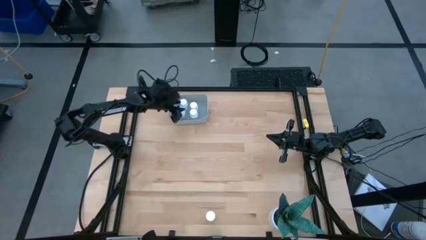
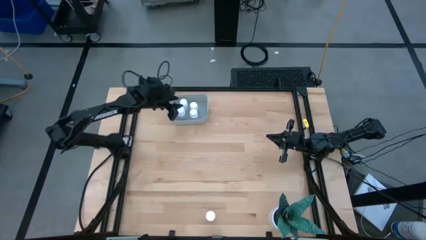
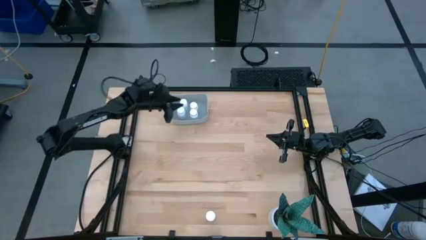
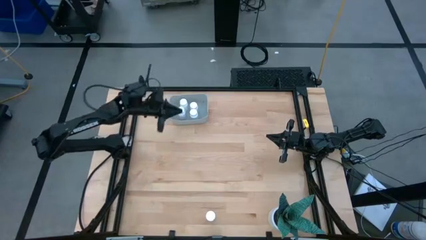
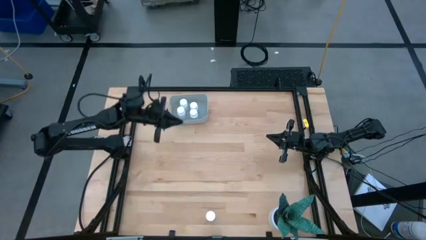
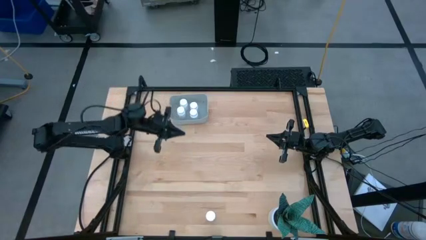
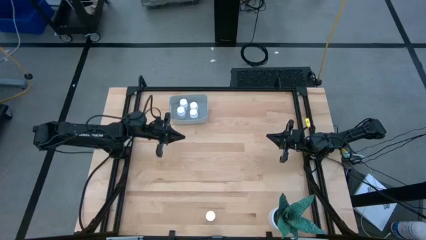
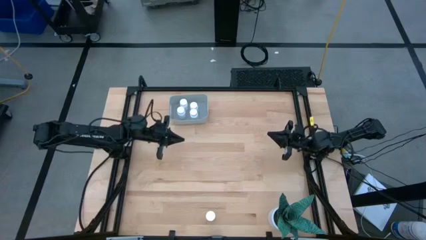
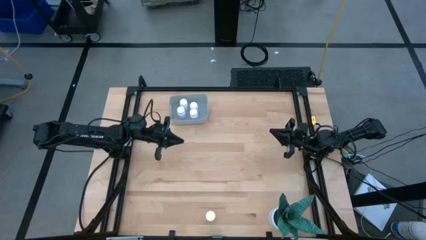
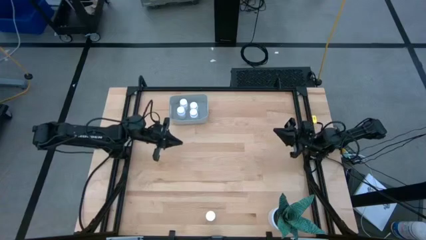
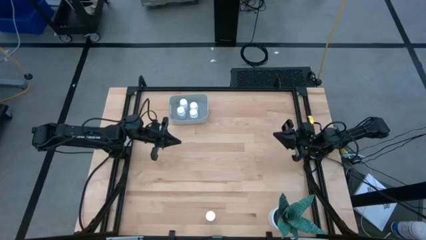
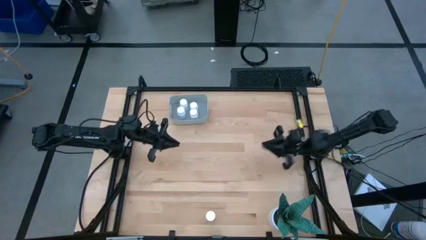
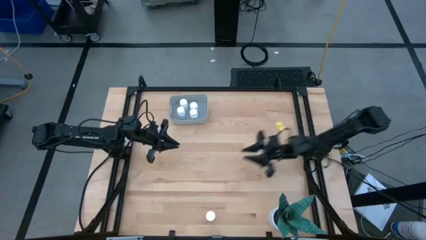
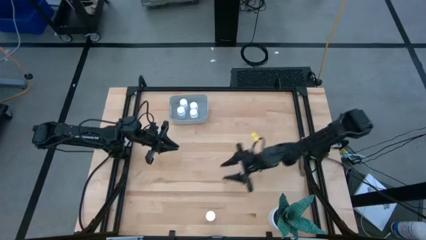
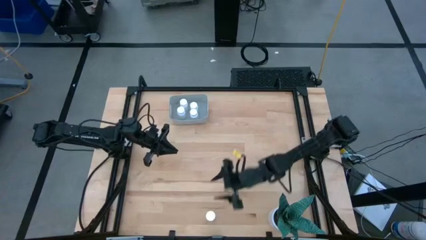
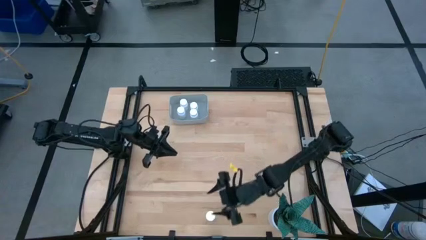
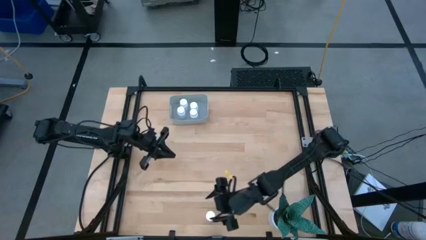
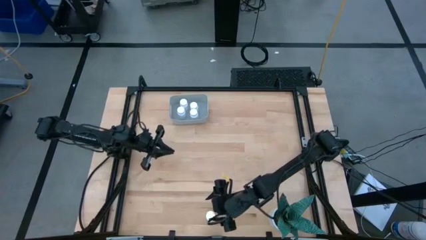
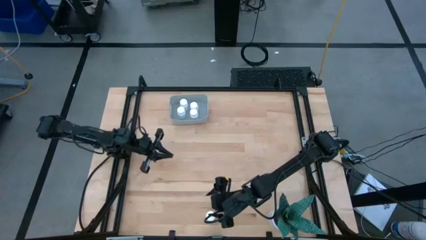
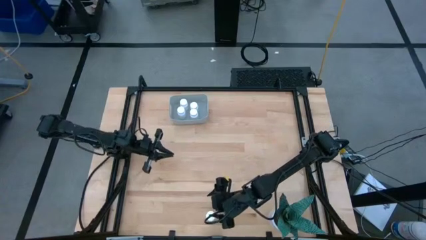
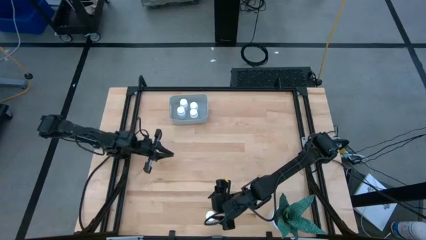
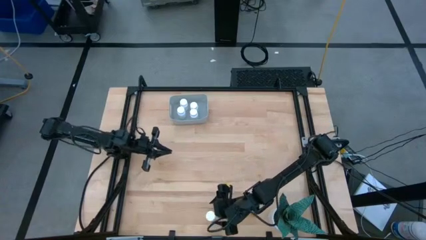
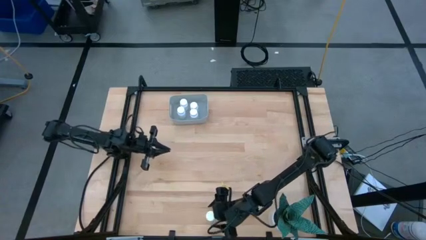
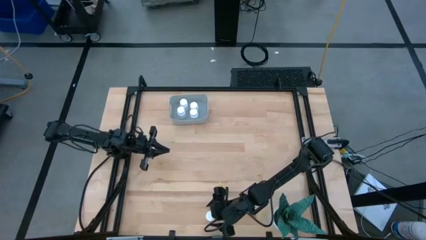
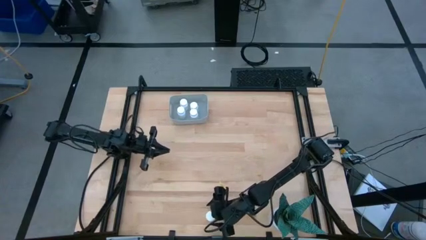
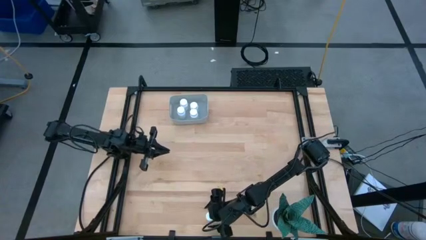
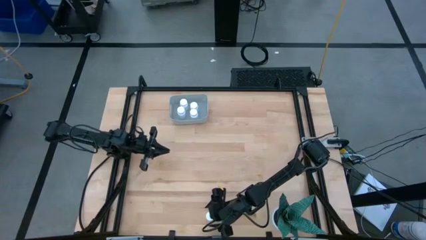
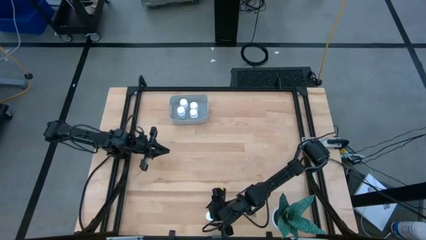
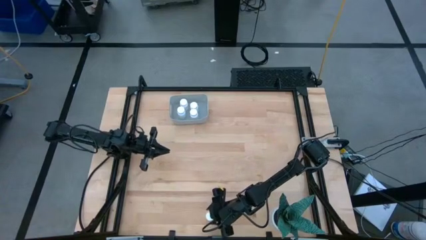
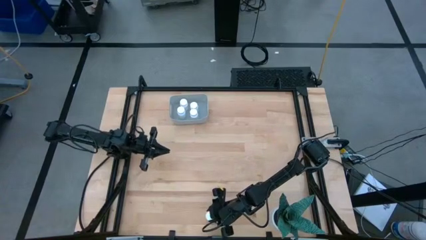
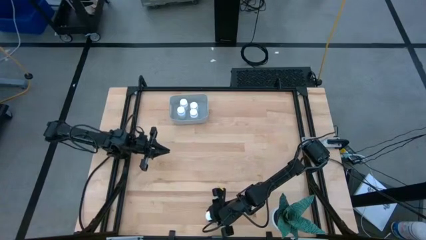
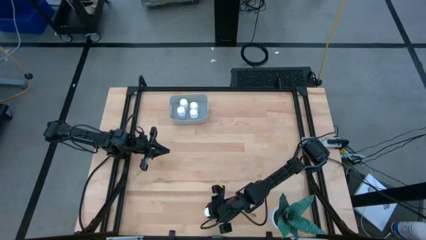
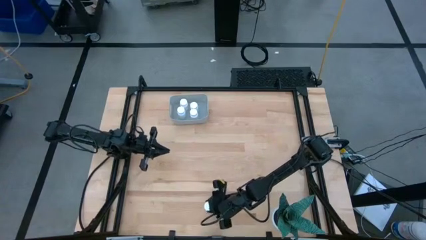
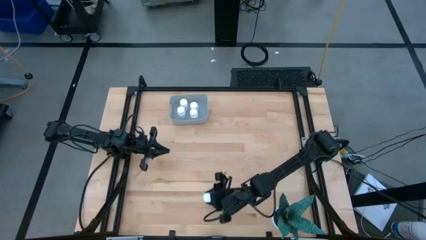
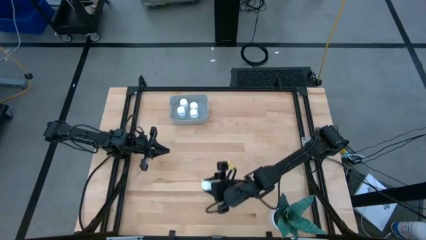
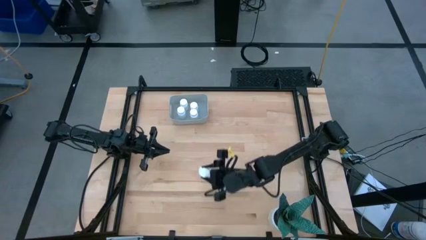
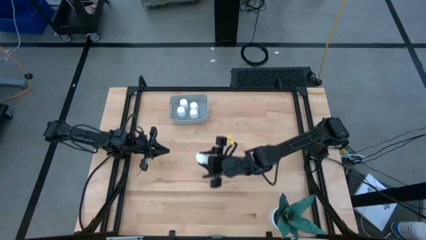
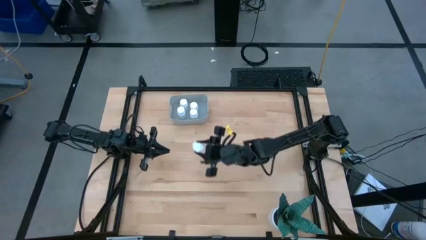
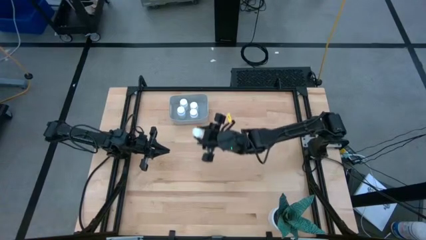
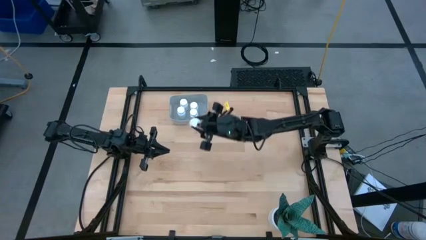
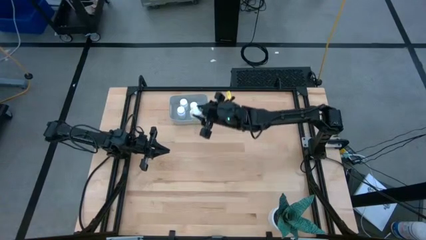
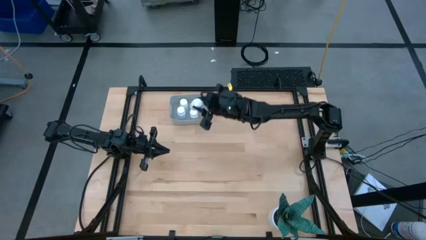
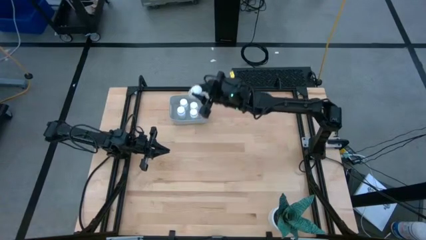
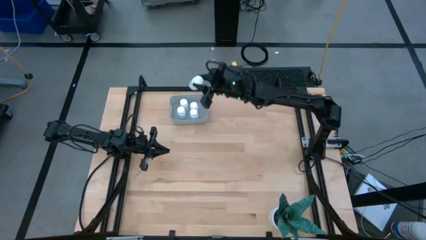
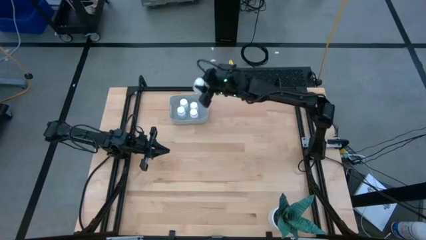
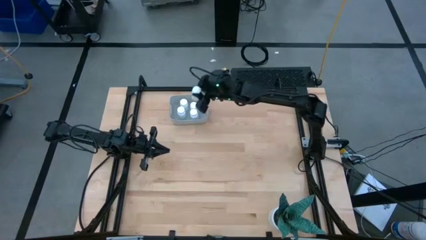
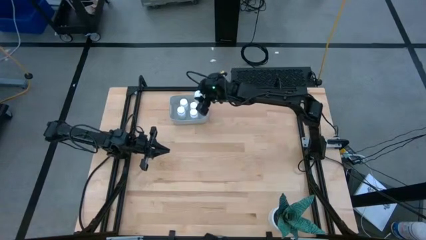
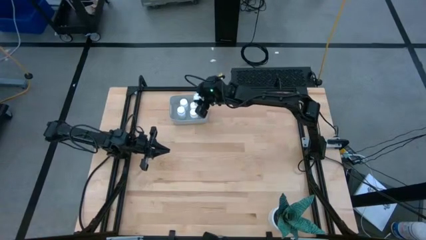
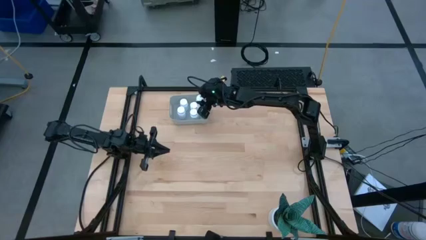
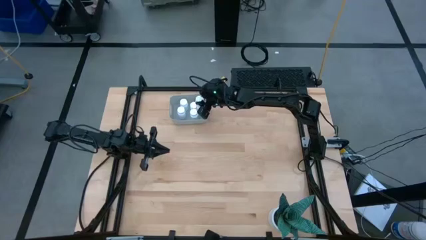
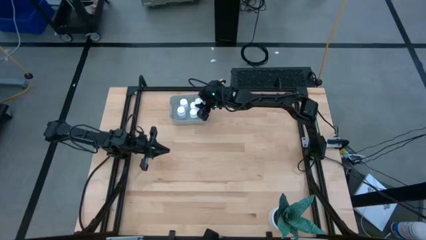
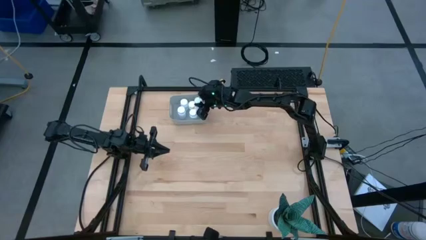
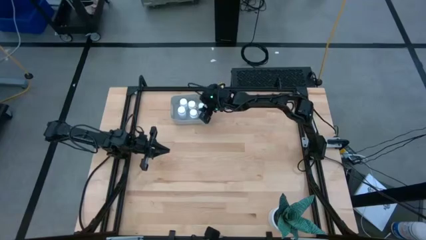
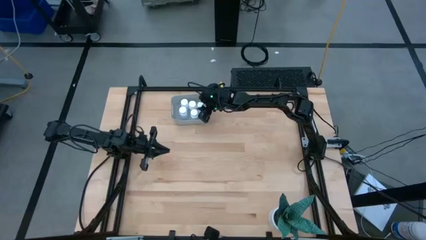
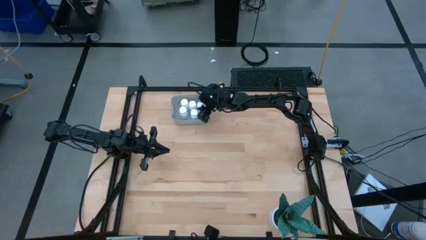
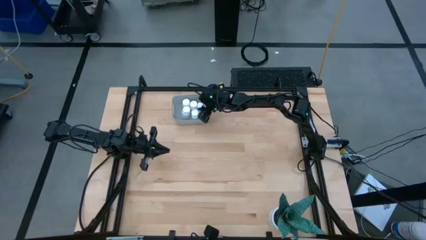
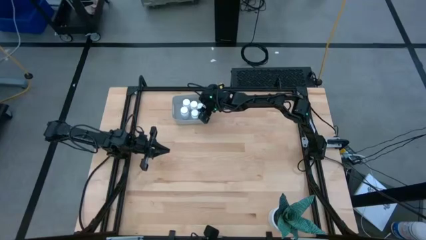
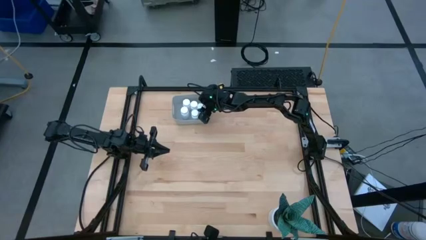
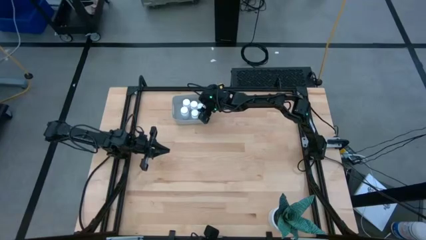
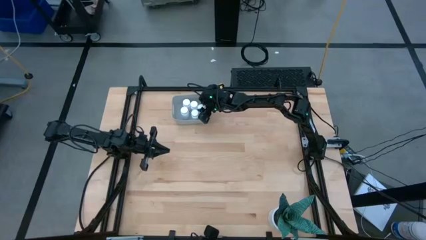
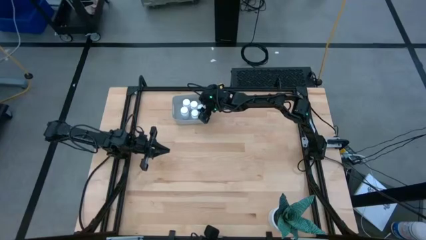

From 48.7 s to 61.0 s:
Task: Pick and place pill bottles into a basket
Put the white medicine bottle into the gray bin

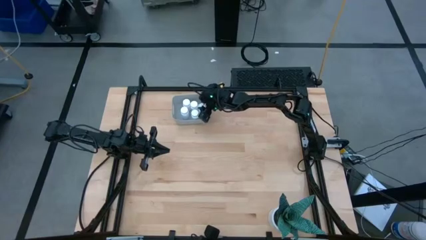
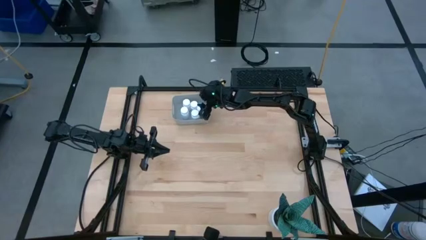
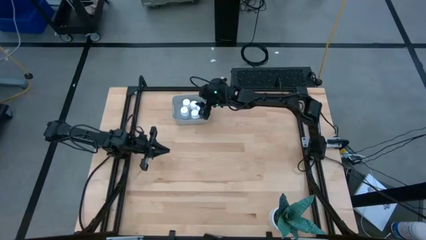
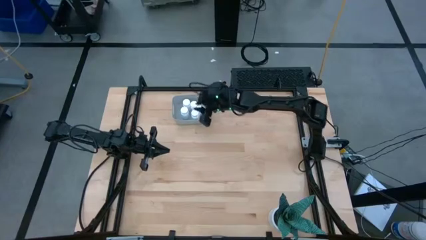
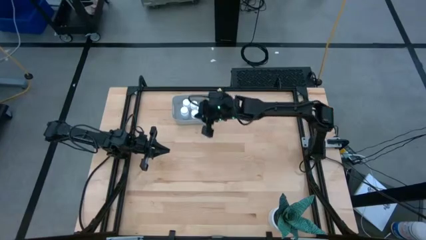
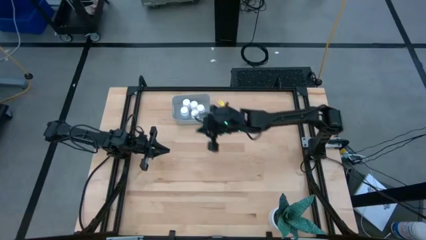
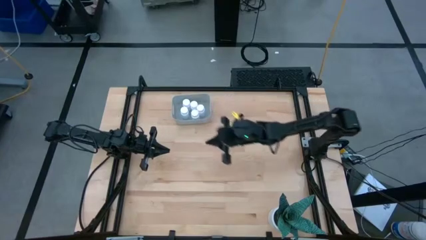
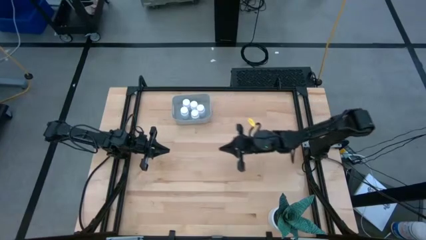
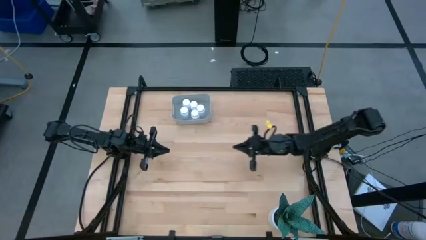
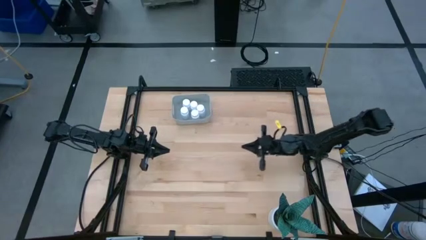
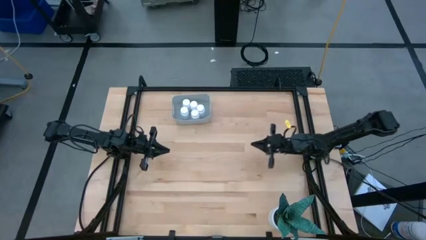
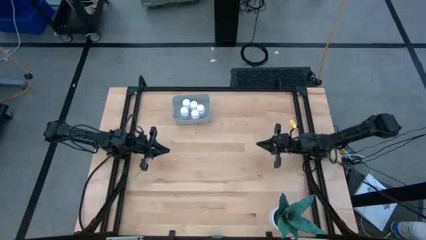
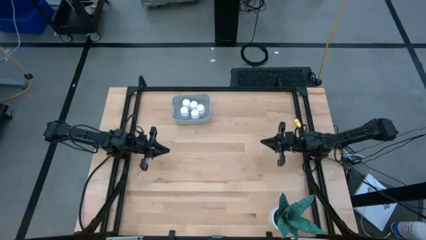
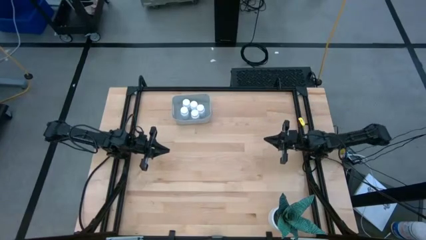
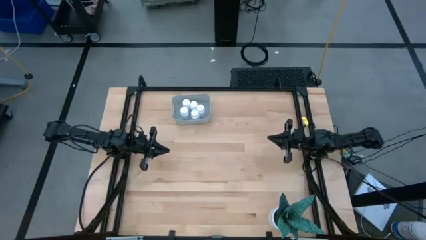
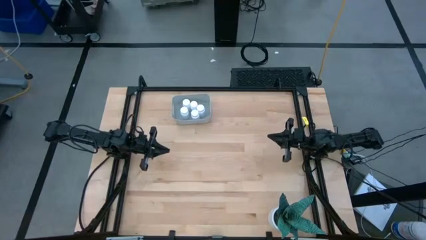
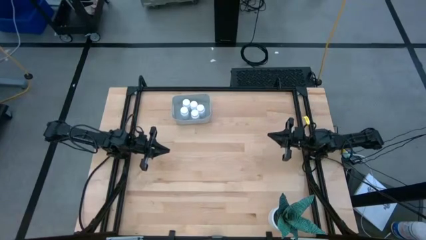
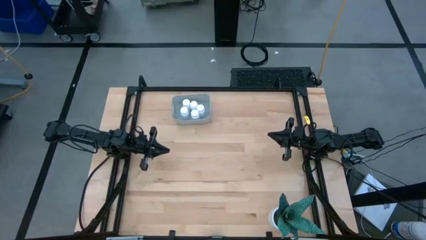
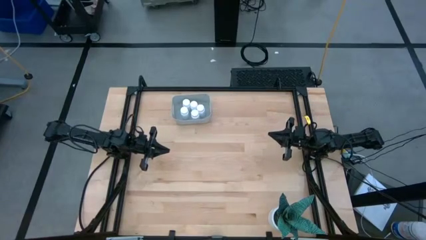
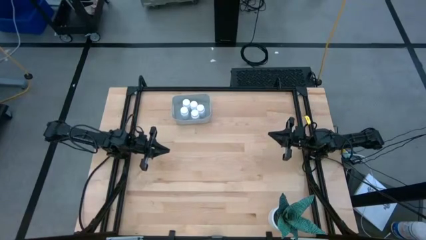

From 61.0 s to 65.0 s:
Return to Home Position
